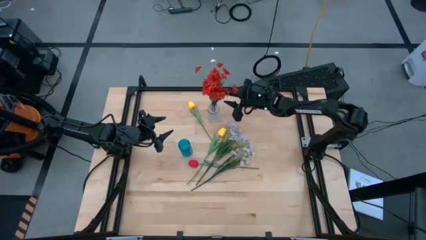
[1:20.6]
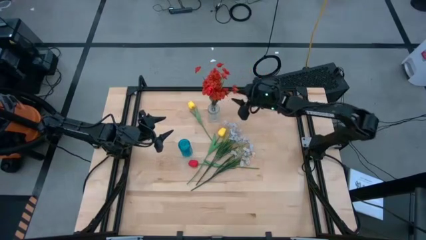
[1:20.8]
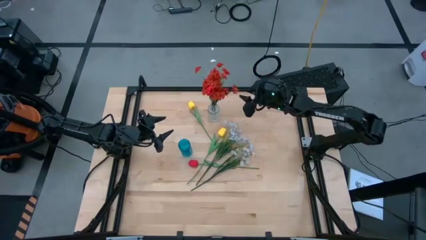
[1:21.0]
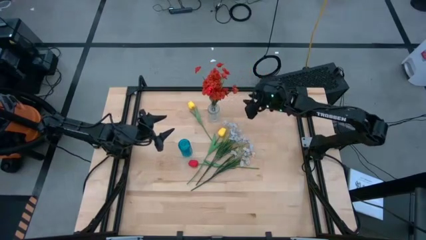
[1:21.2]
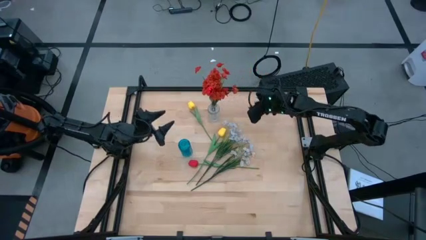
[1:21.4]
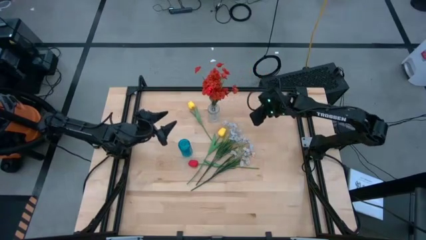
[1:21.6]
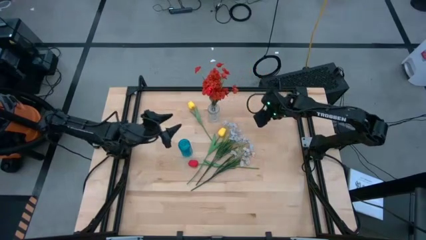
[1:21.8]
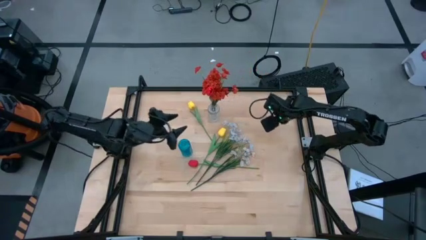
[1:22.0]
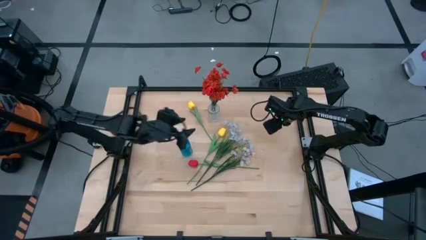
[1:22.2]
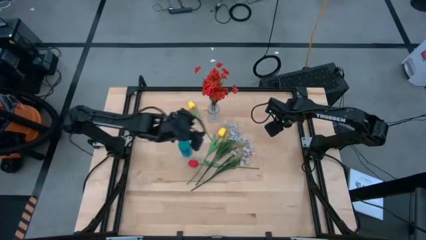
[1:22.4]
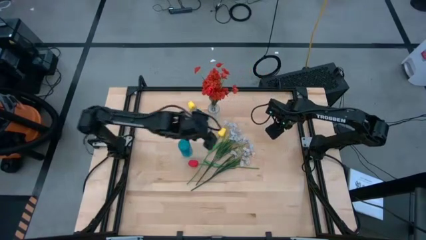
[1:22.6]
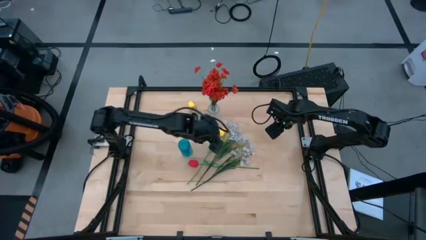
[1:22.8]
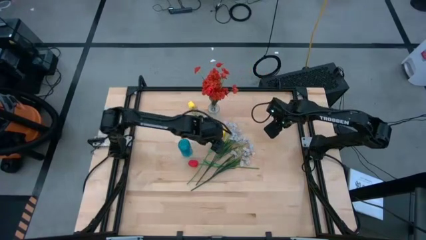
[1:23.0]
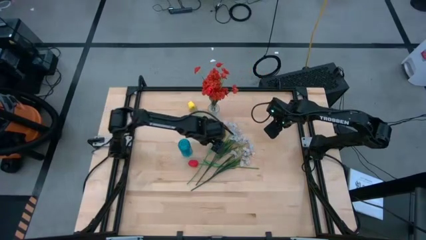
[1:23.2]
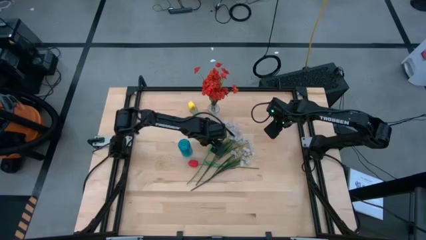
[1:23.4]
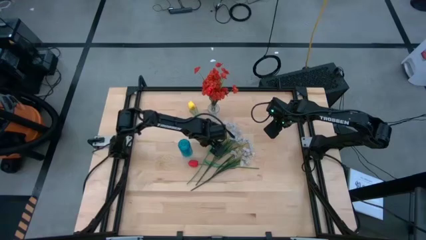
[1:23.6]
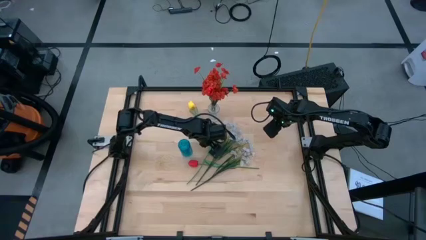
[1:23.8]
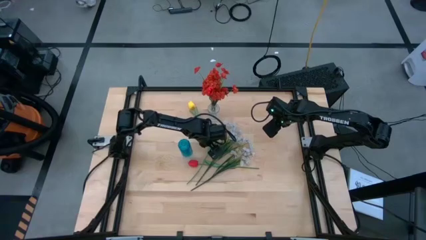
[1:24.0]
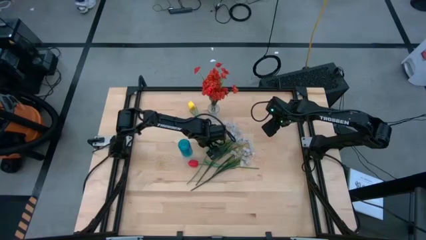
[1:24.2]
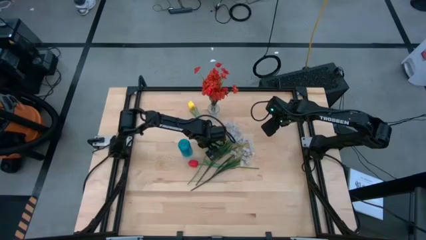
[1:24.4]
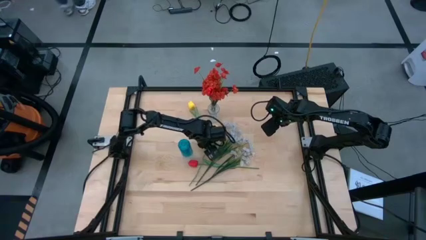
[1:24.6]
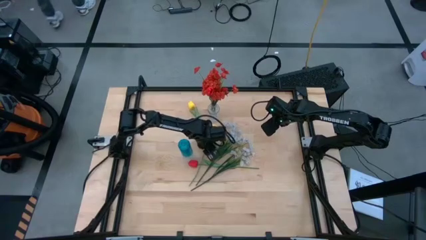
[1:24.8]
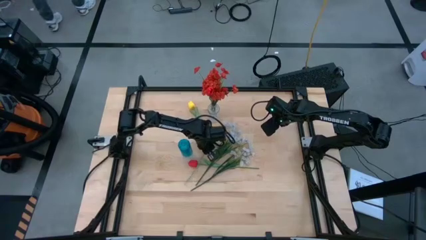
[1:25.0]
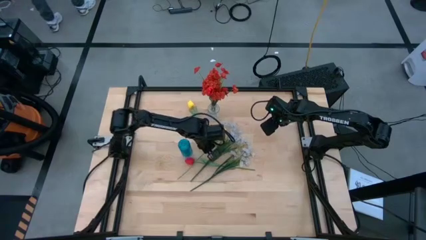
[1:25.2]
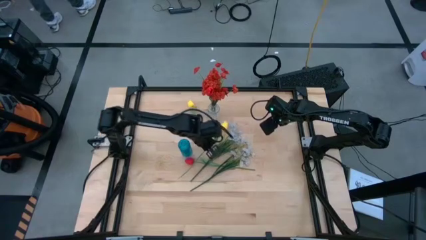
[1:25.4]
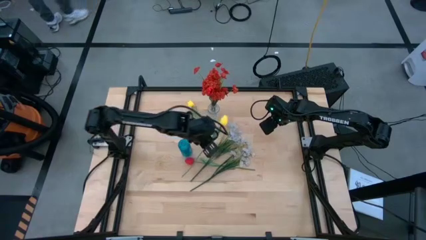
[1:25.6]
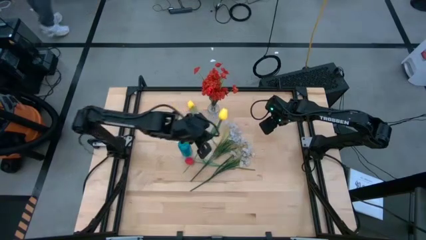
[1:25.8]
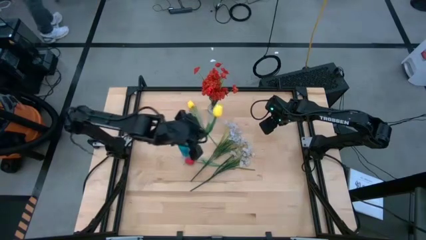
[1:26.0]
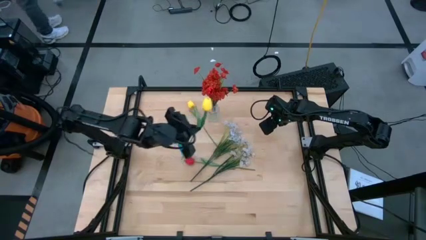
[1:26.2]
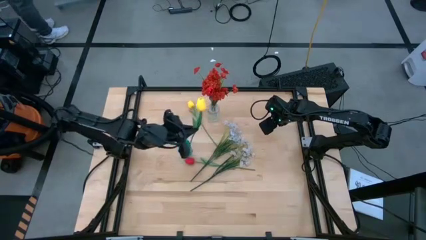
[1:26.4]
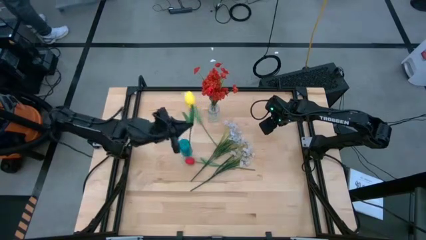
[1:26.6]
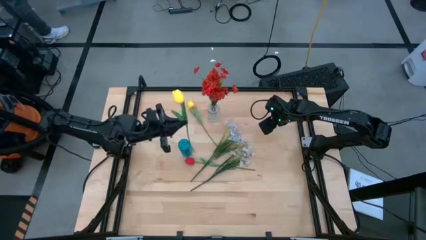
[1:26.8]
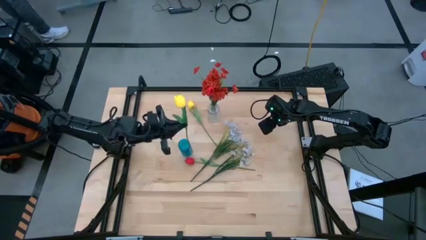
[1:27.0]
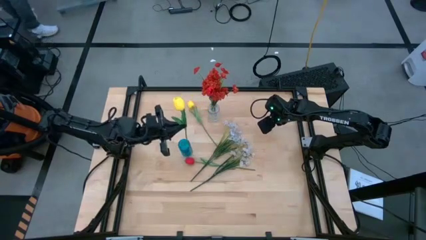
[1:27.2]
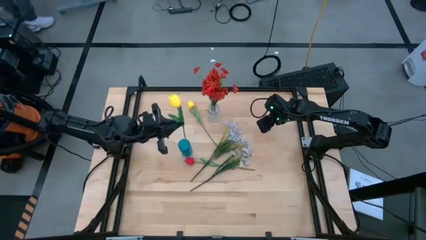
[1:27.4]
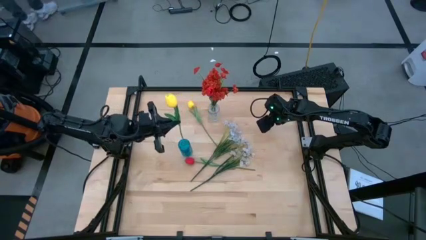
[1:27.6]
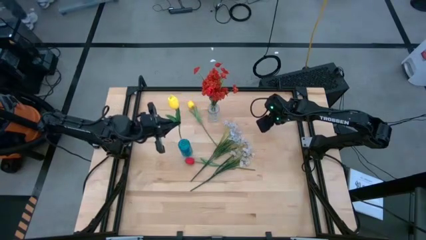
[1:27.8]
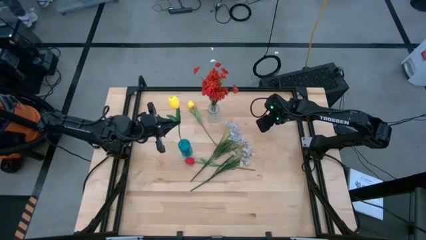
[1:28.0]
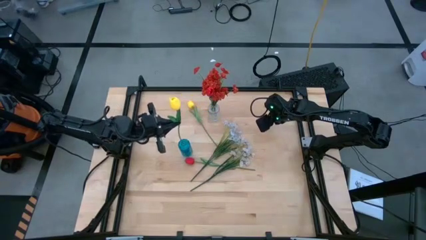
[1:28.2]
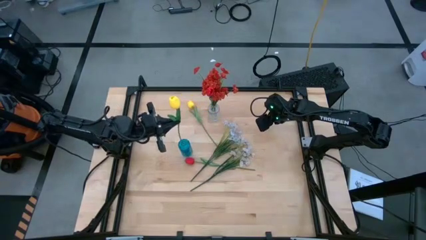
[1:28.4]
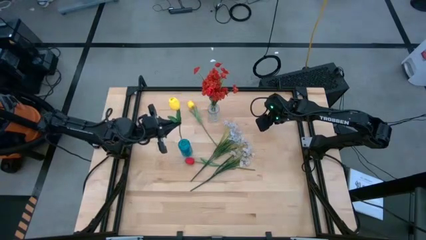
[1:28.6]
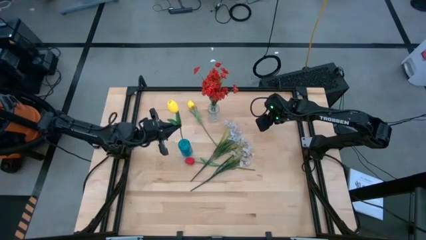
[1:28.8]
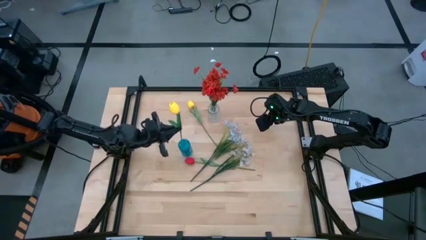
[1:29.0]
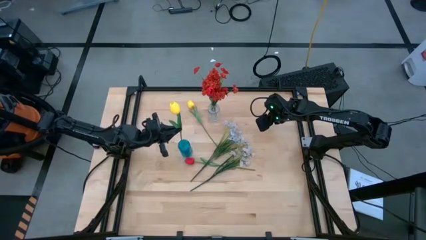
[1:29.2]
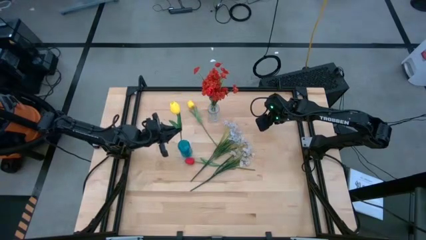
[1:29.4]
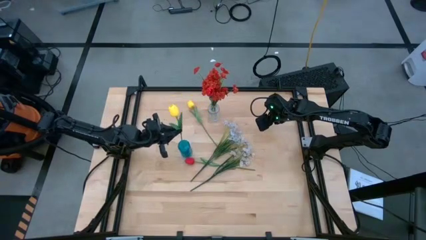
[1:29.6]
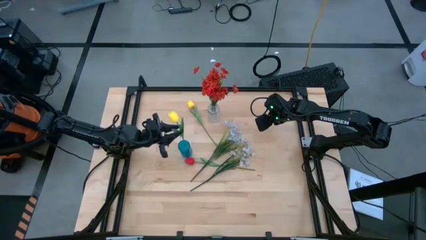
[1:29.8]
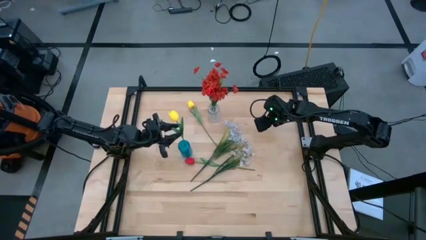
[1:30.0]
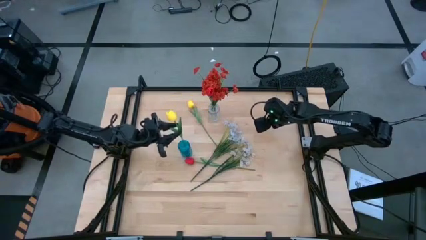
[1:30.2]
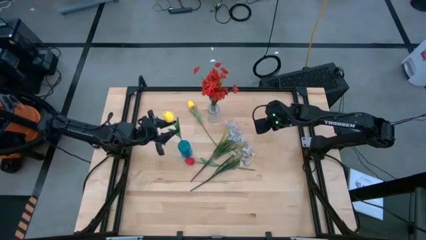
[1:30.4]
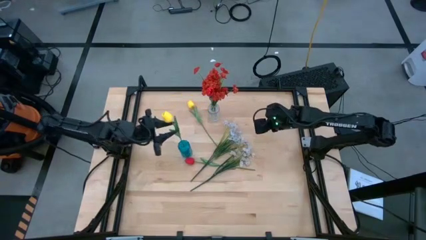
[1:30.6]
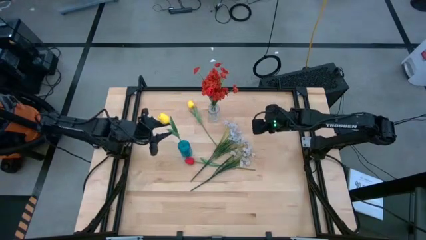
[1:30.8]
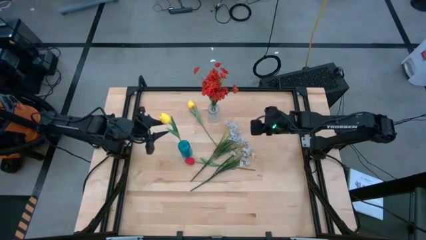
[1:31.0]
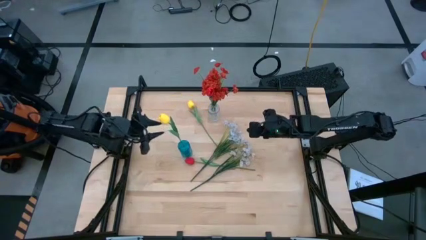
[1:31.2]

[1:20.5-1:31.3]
Task: Sort flowers into vase by color
Put the bottom yellow flower into the blue vase

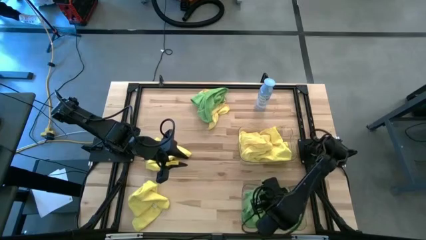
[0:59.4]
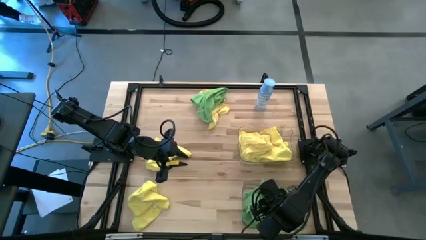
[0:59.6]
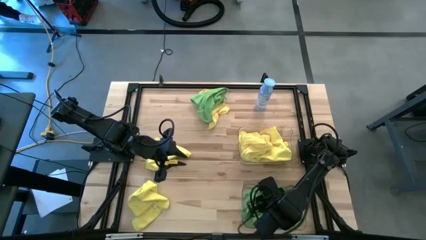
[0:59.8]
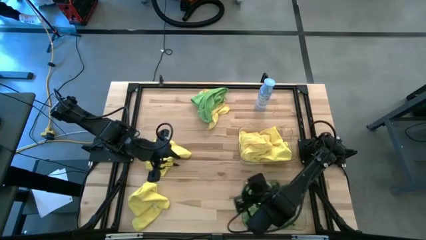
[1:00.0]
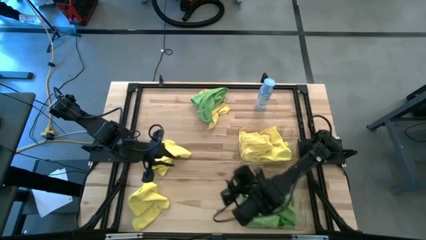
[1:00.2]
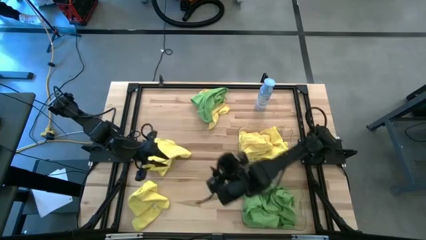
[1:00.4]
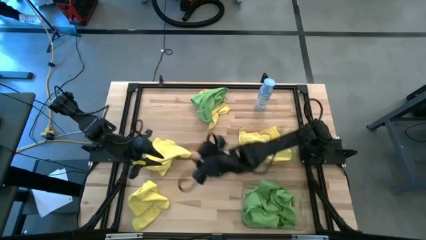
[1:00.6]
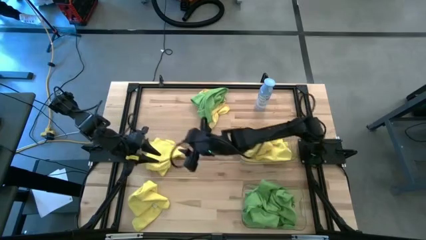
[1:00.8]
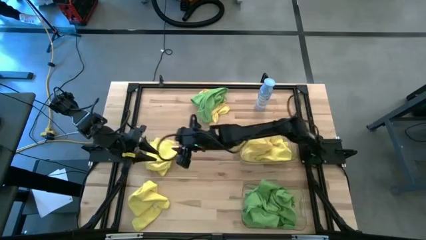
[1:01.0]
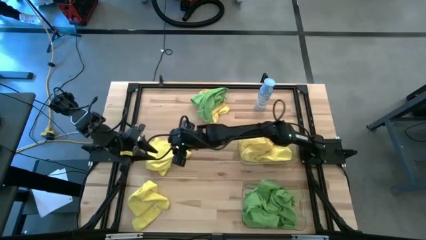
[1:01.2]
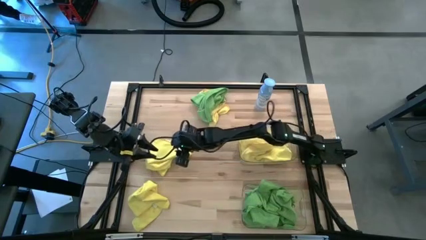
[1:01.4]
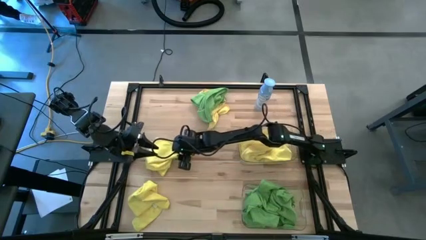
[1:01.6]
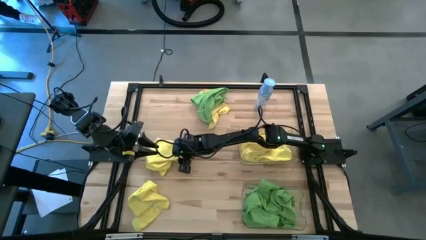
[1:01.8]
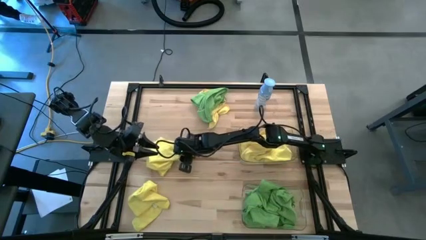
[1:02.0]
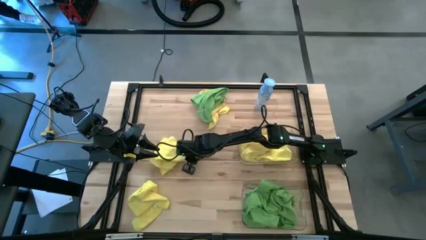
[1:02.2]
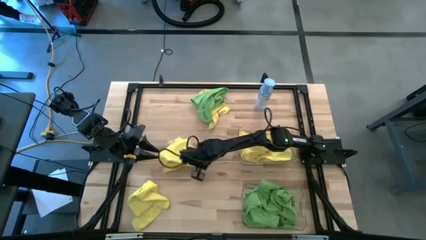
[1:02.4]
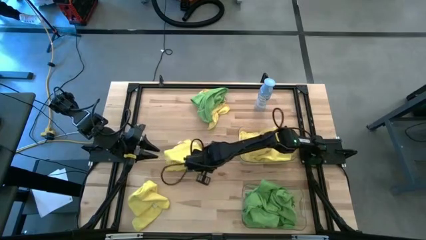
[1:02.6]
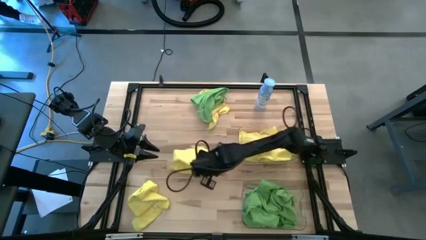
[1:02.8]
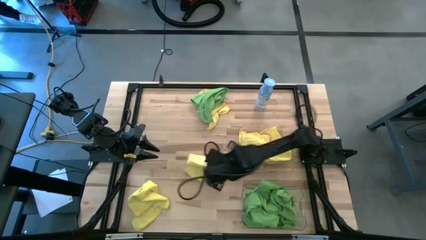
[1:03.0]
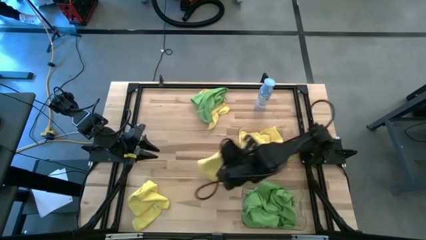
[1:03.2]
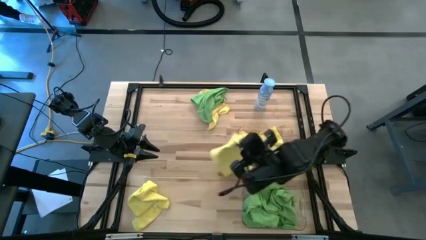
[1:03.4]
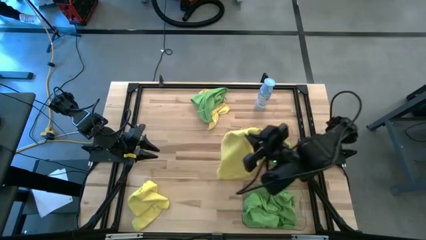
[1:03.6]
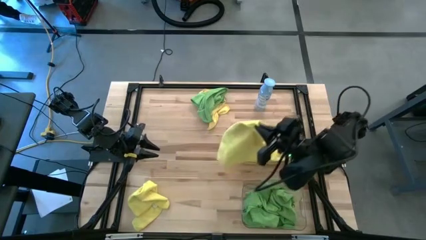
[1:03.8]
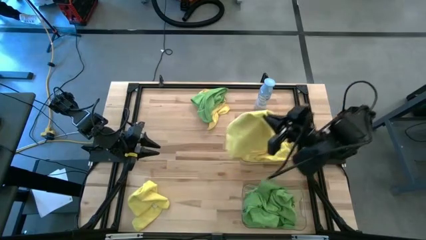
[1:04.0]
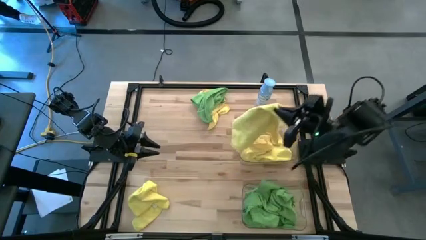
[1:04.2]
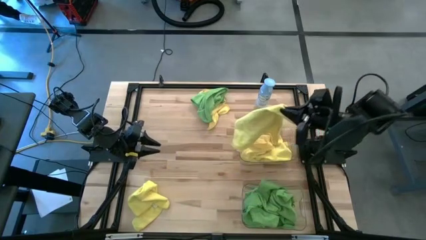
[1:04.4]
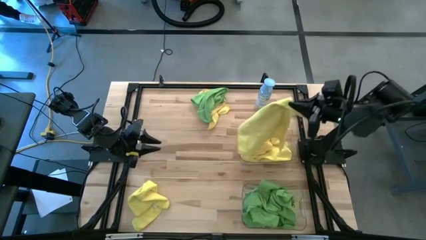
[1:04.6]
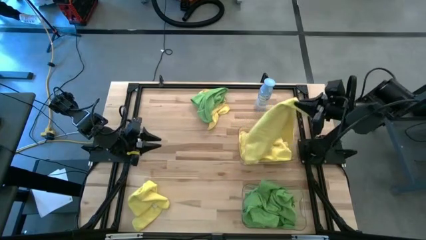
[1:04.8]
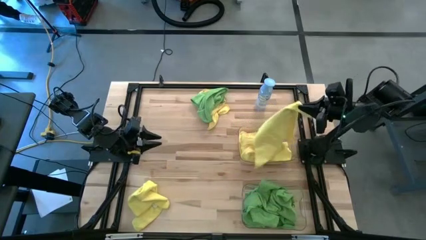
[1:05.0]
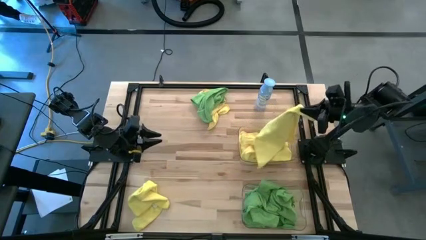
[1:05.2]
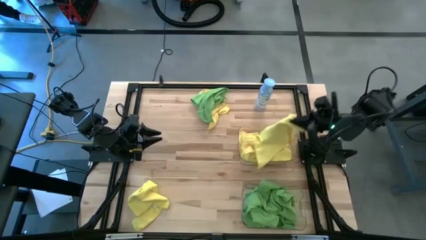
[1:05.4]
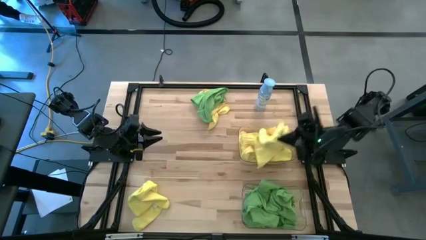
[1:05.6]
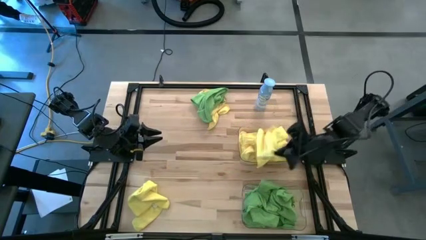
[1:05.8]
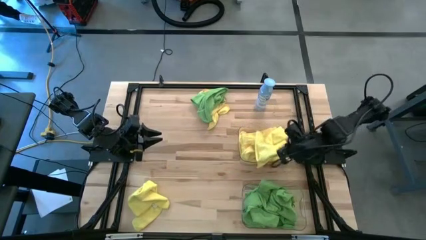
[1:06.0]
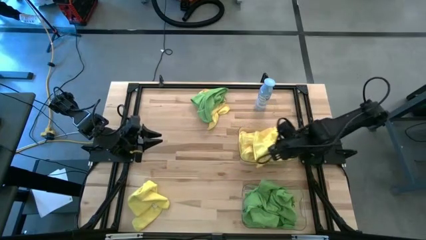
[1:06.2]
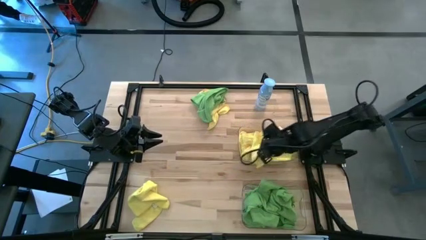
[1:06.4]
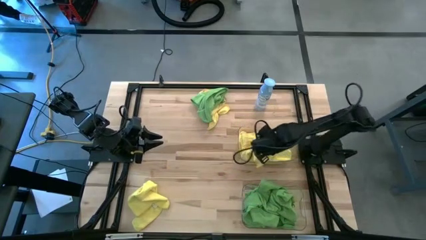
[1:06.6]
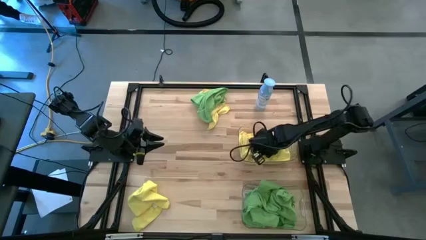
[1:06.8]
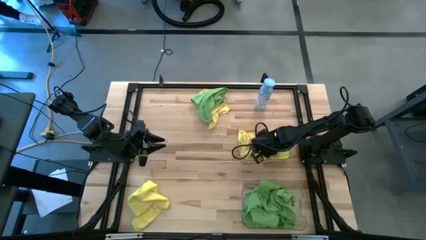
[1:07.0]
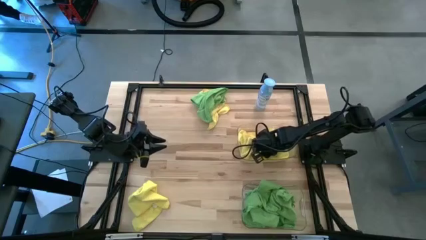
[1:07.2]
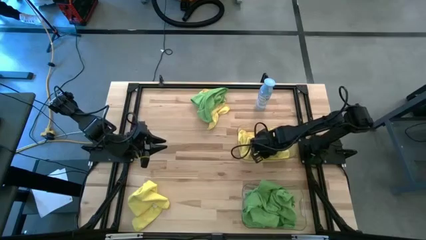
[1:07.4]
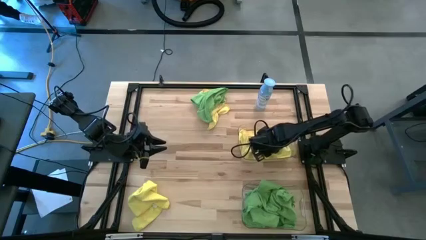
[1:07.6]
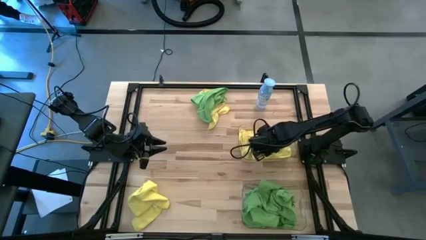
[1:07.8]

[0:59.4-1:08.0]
Task: Sort microfiber towel by color & place in baskets
Put the yellow microfiber towel into the top transparent bin
